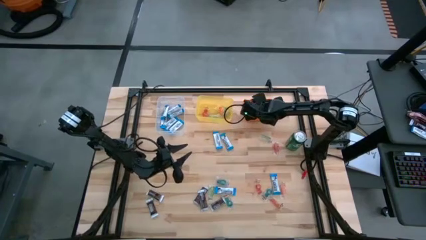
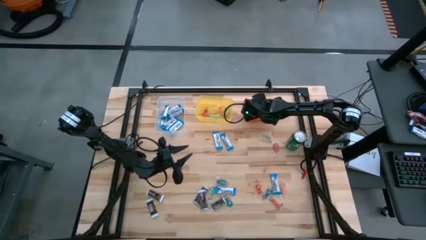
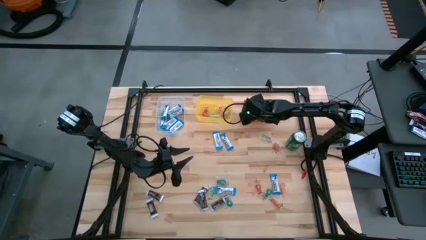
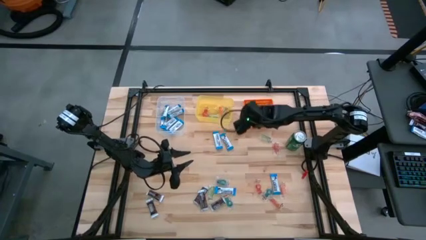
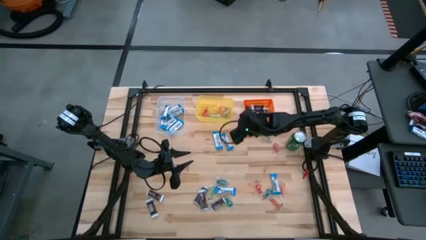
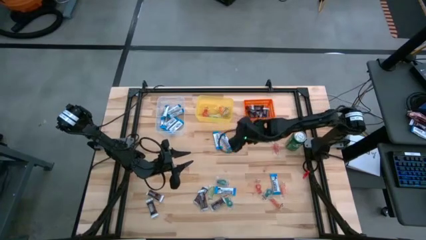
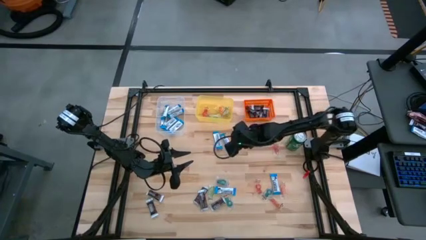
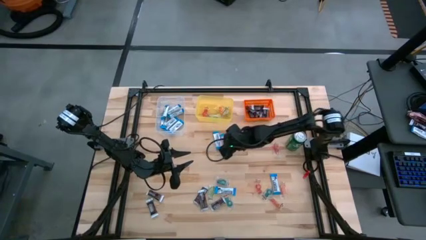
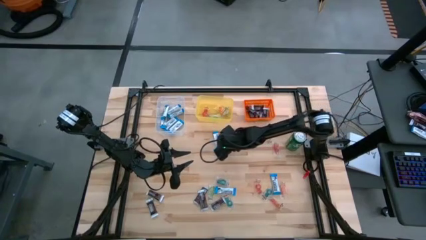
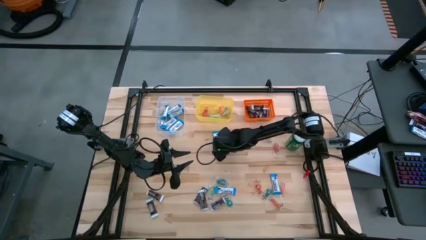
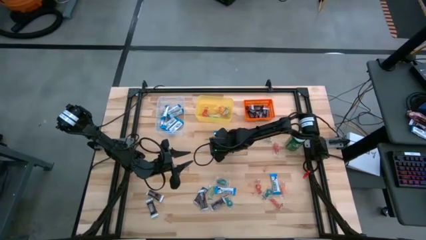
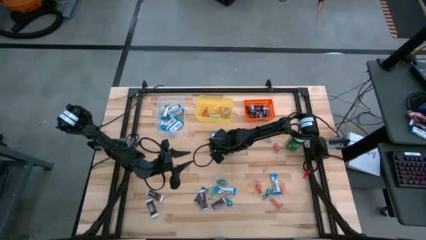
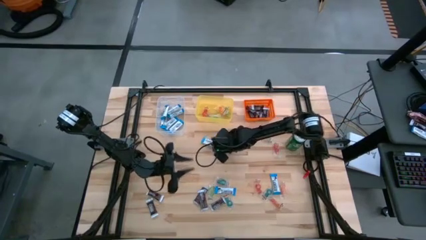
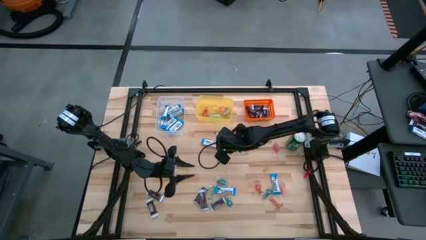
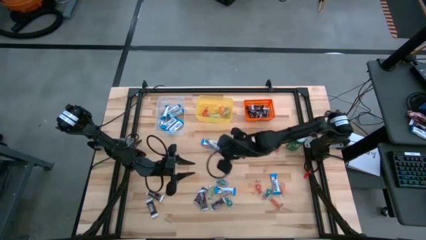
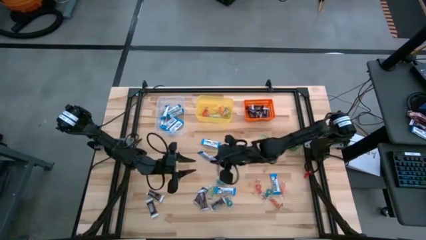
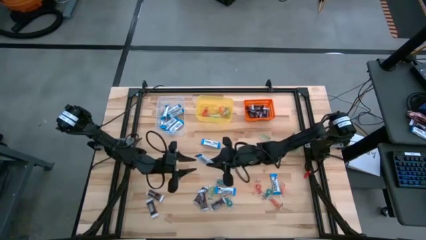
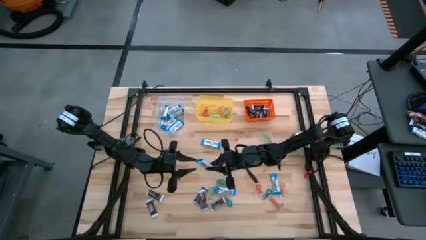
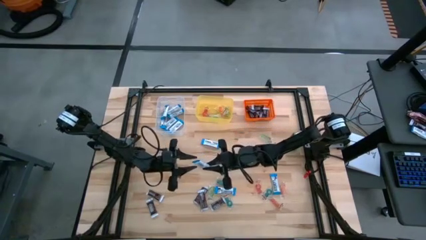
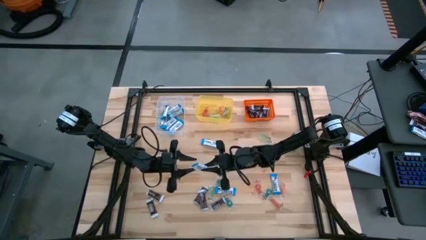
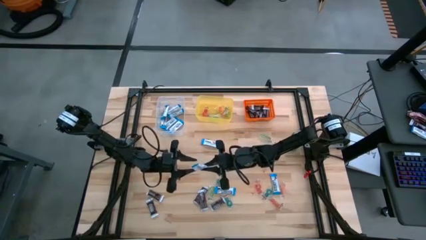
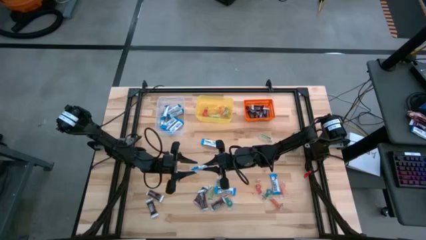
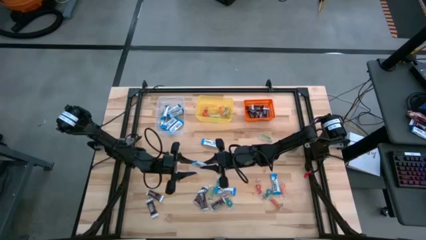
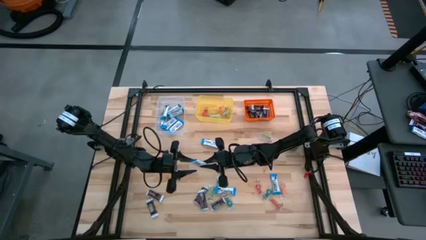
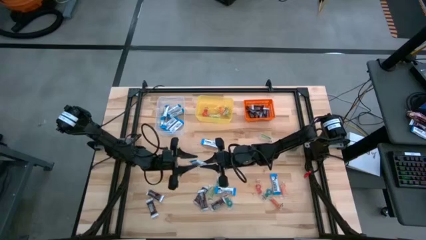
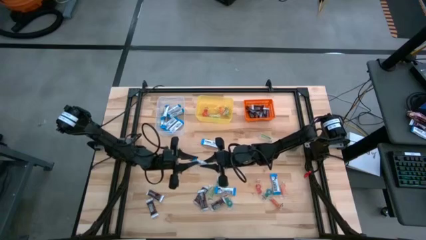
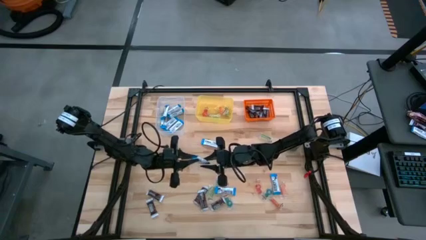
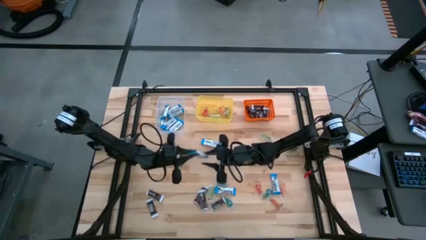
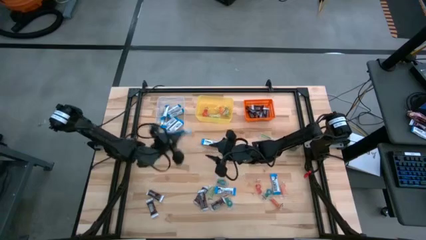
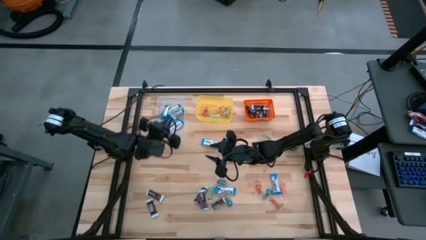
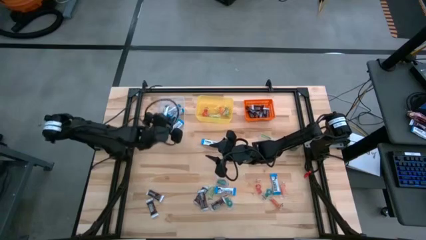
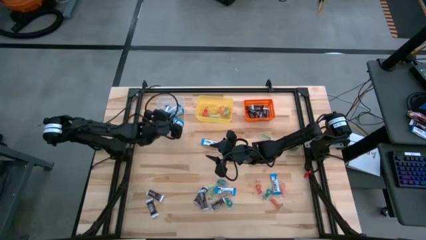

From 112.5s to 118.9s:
Task: Sort candy
Put the white chocolate into the transparent bin

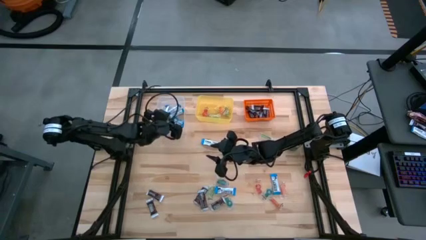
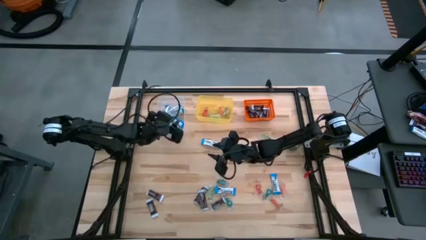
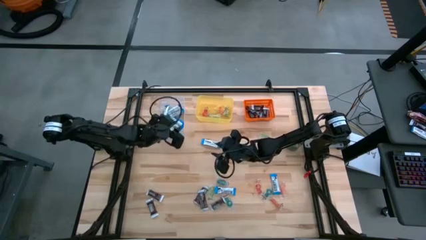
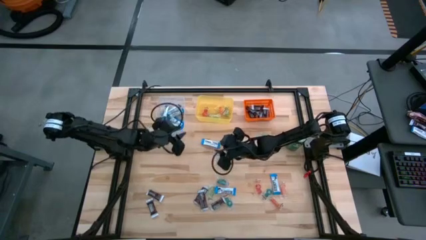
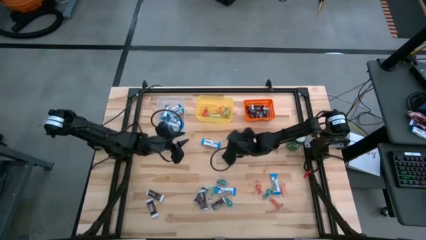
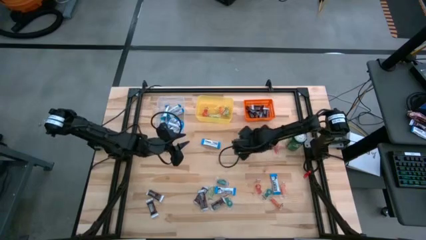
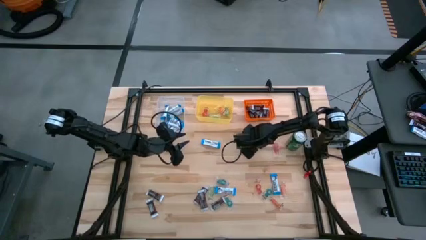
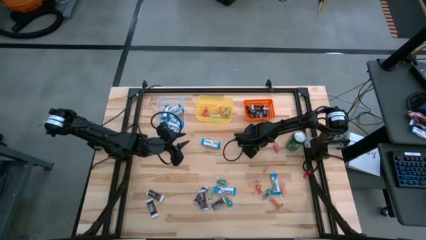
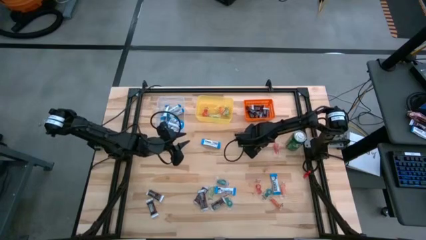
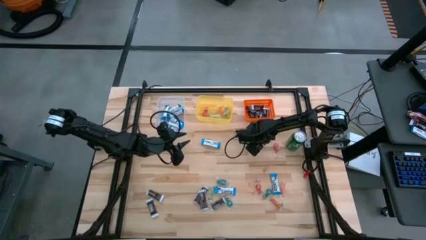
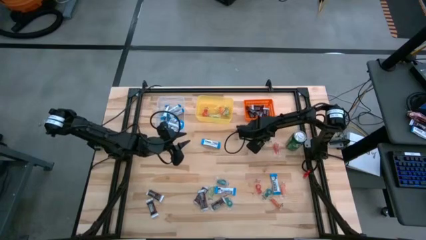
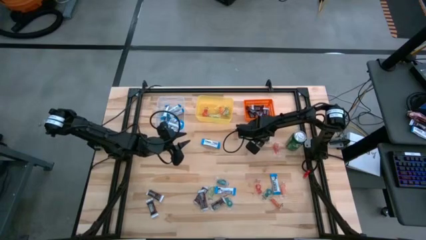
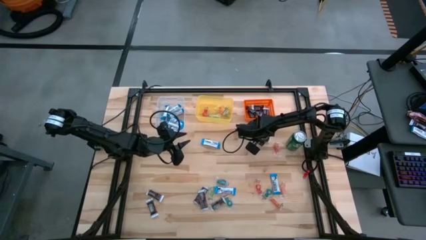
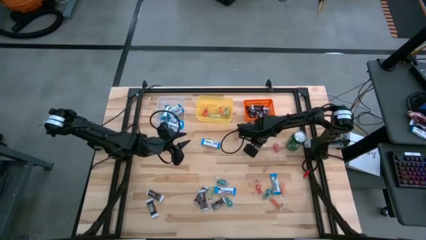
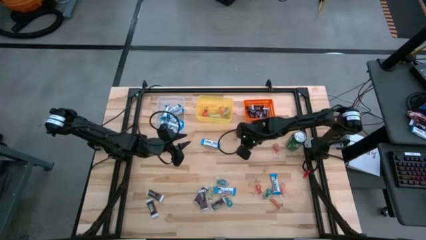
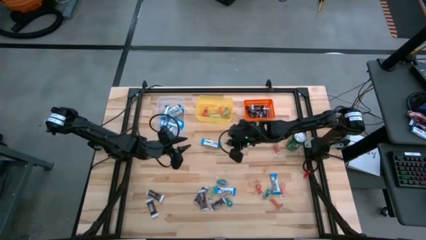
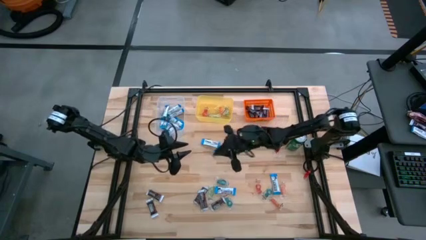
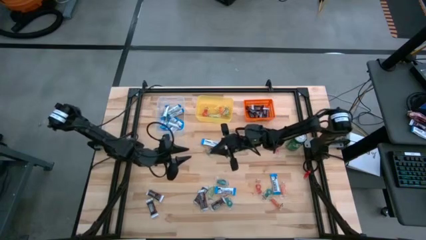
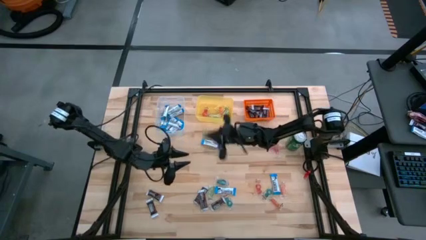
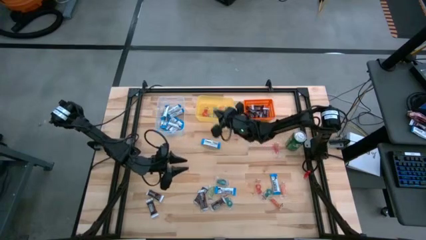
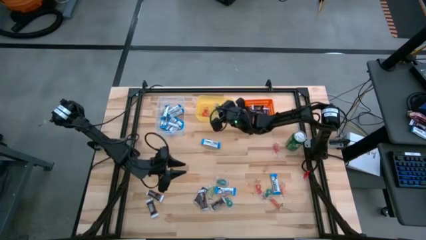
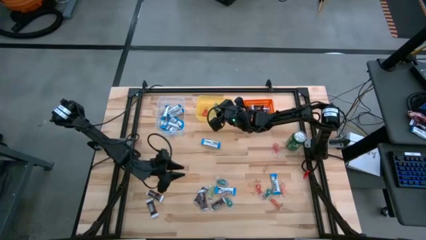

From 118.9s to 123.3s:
Put the green gummy into the yellow bin

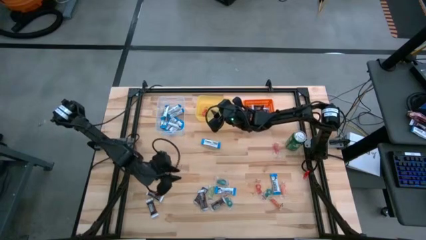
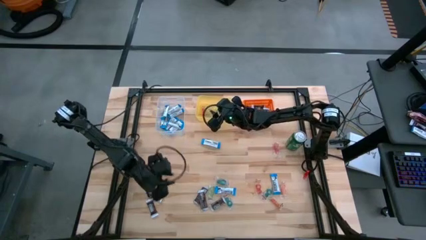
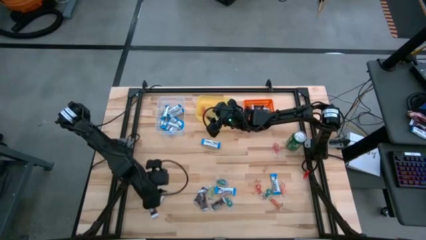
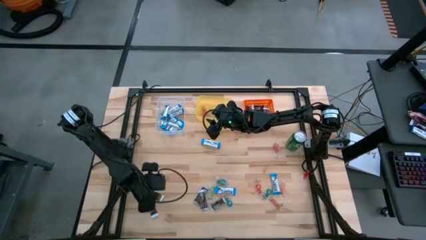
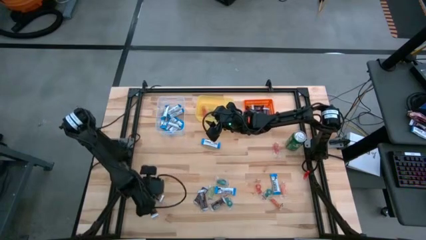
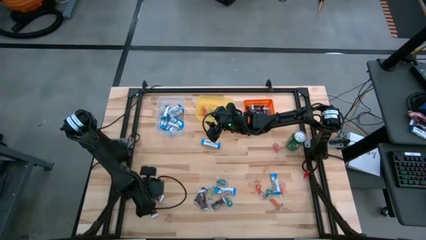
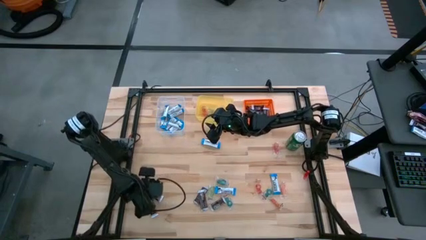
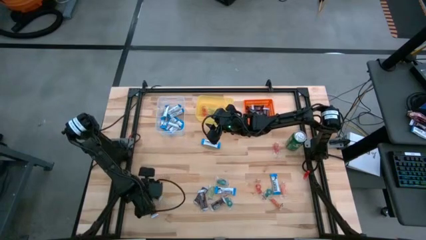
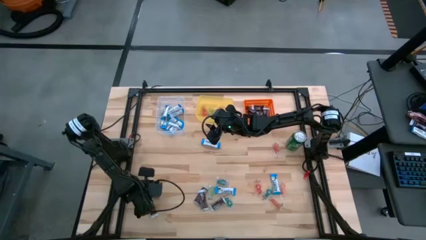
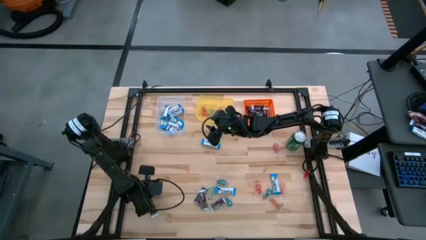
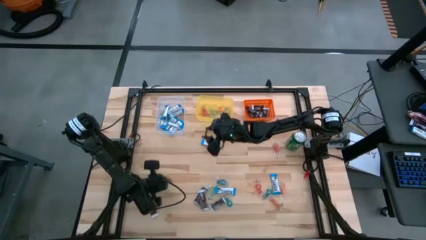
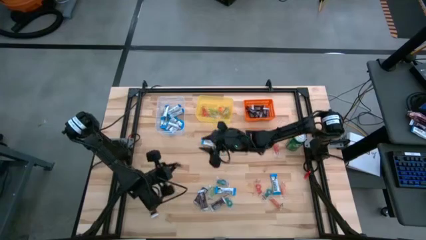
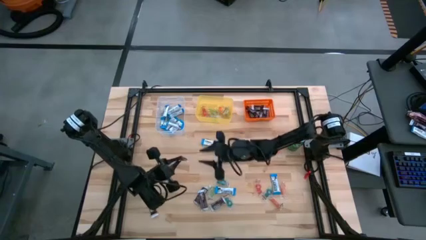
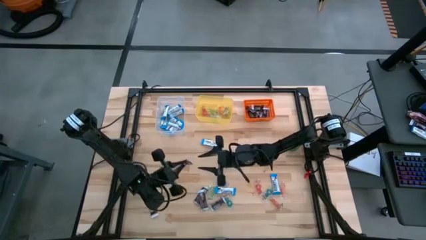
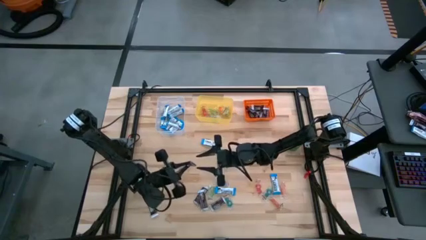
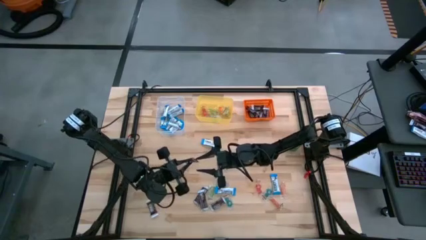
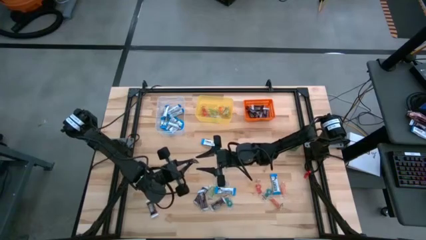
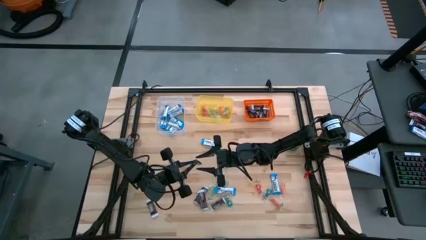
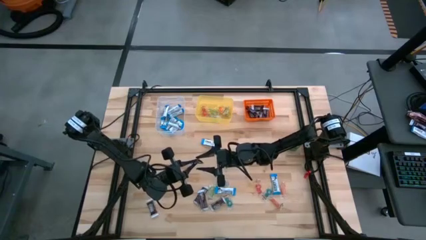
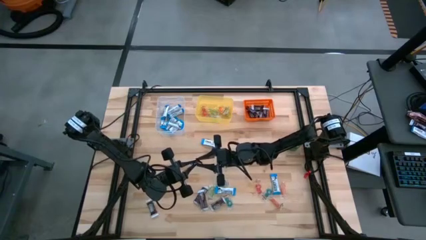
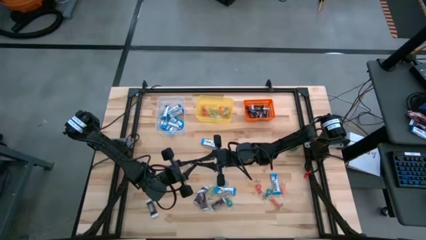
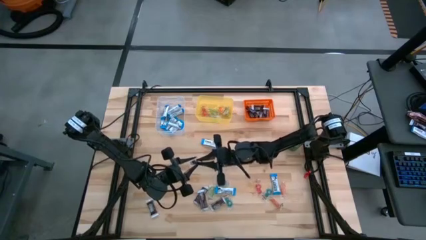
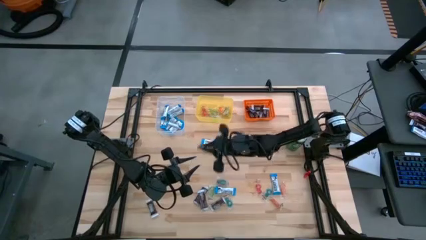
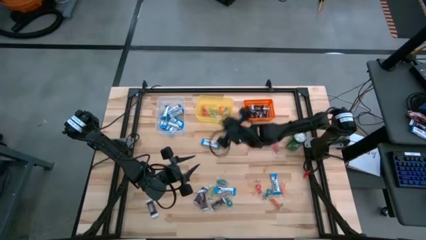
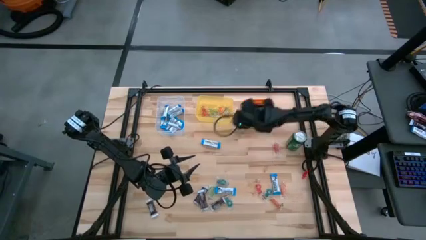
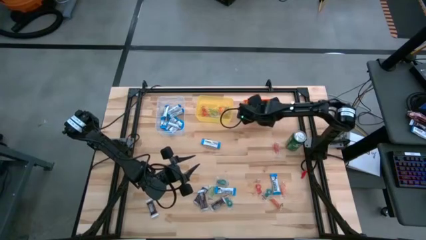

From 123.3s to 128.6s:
Put the black chocolate into the orange bin
